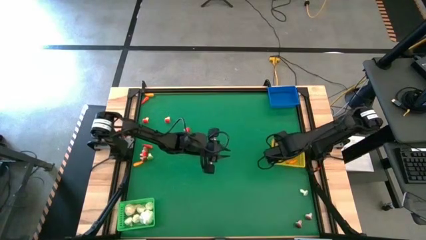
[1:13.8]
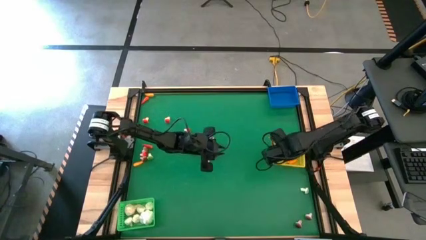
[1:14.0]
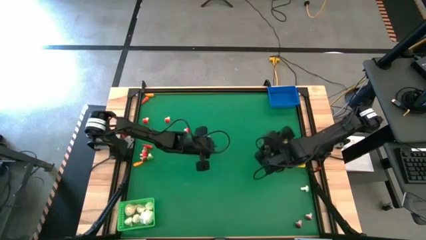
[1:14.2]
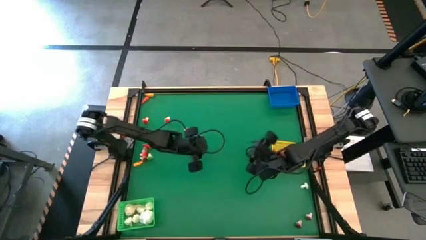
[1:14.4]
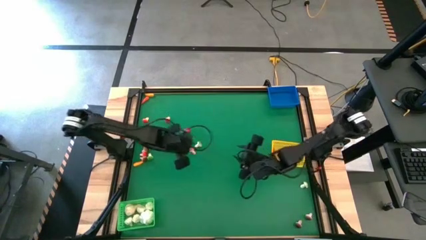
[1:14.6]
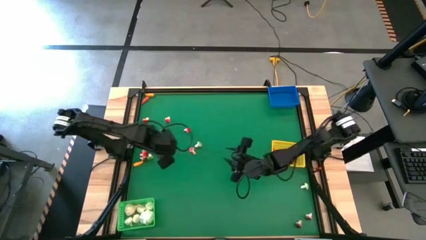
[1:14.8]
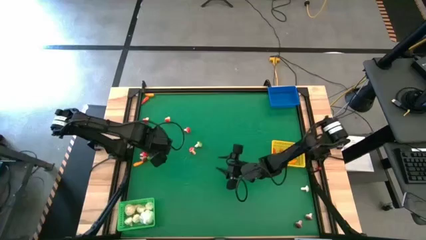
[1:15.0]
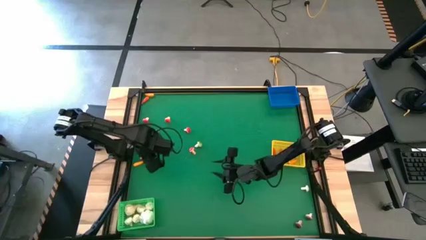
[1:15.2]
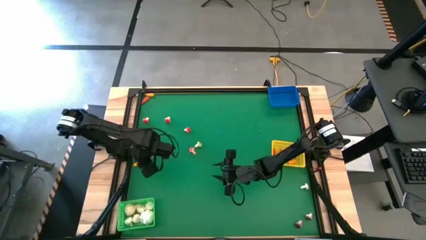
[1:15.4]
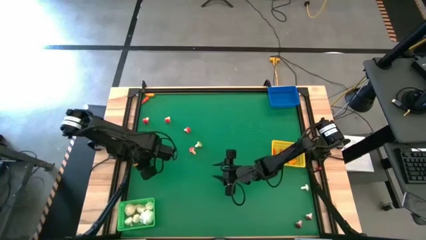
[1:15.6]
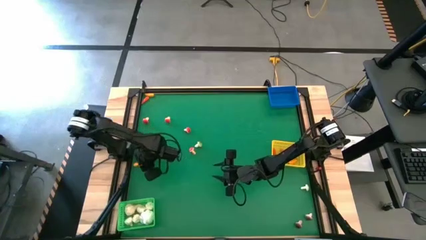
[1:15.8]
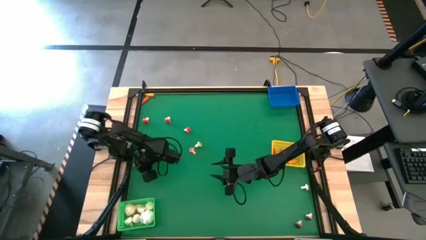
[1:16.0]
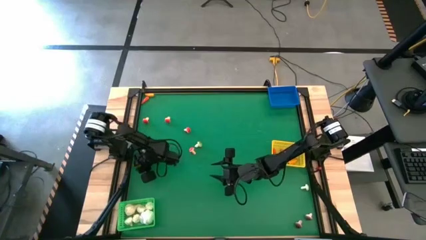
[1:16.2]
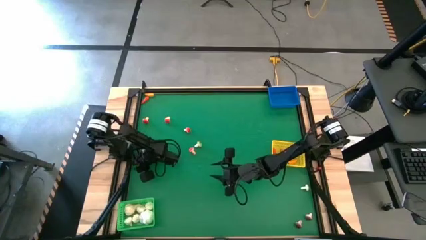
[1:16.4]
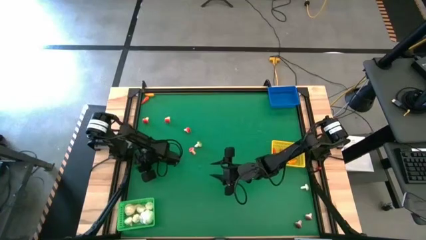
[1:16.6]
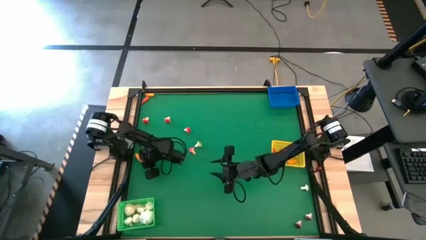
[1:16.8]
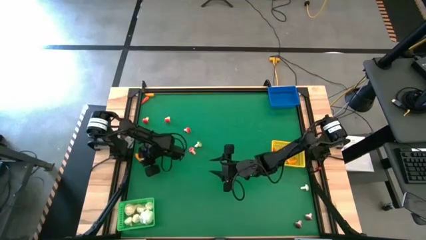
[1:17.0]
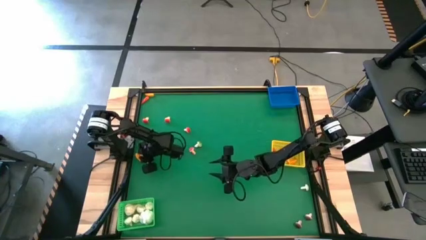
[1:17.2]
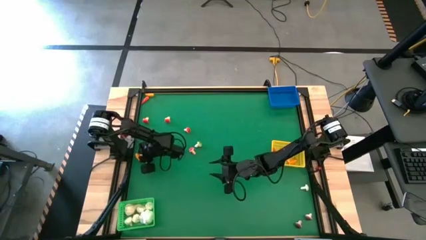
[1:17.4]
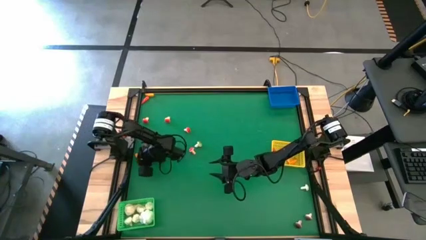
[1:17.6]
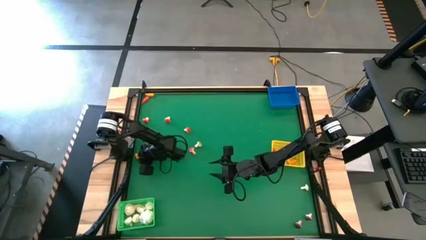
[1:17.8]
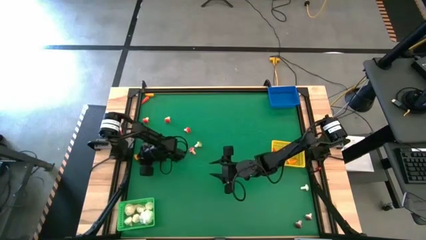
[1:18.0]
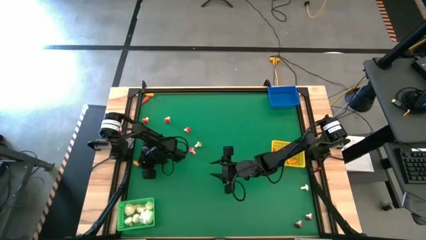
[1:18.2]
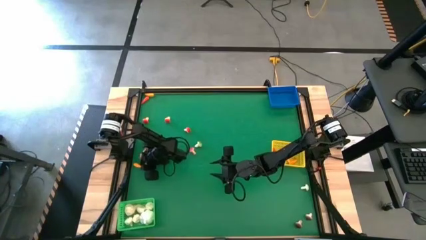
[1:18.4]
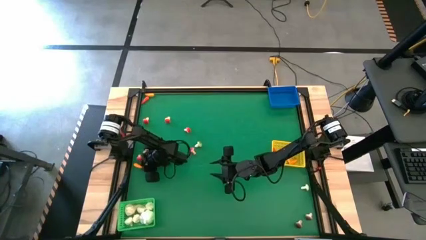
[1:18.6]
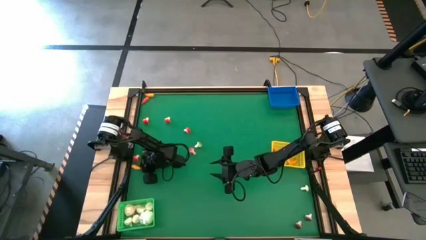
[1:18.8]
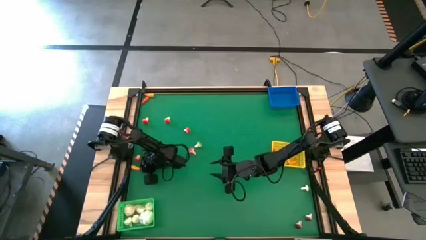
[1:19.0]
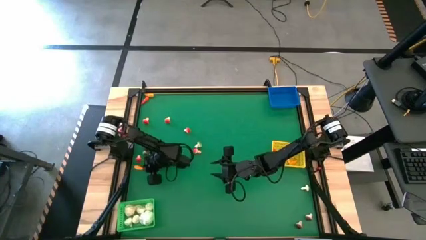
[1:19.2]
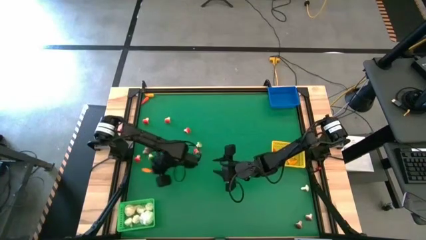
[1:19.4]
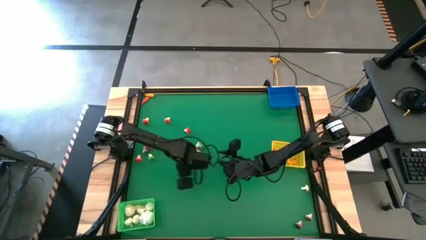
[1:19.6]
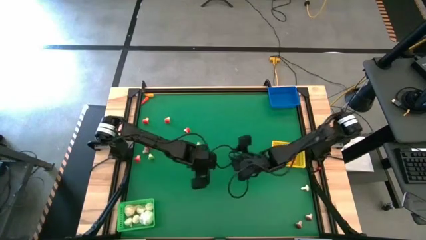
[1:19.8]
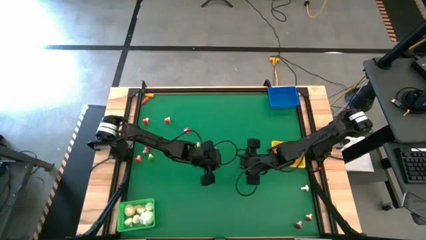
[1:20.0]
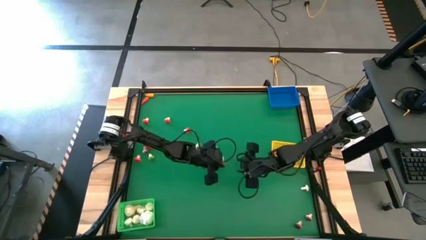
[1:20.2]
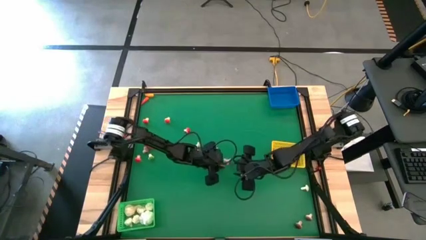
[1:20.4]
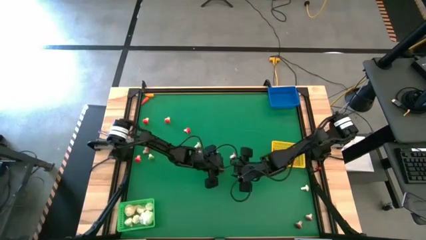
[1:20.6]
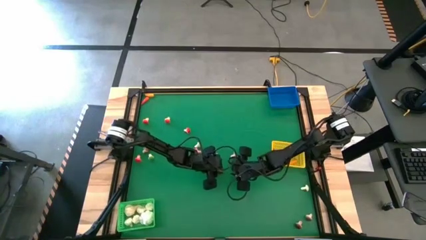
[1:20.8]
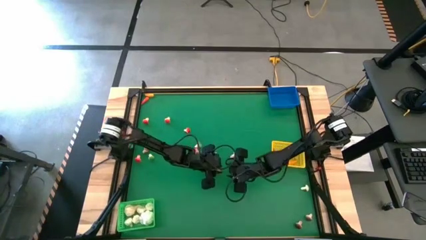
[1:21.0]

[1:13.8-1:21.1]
Task: Sort produce into baskets
Put the brown mushroom into the blue bin

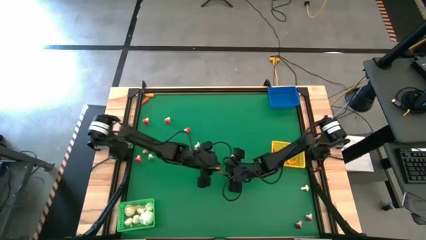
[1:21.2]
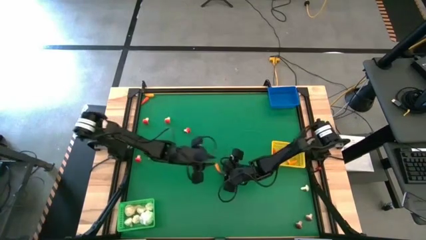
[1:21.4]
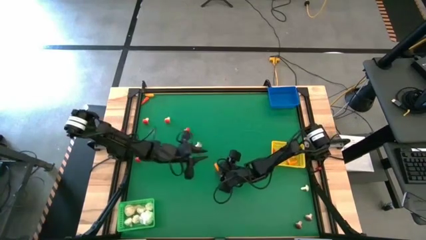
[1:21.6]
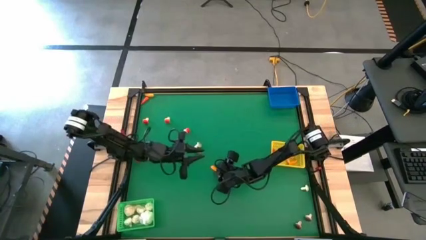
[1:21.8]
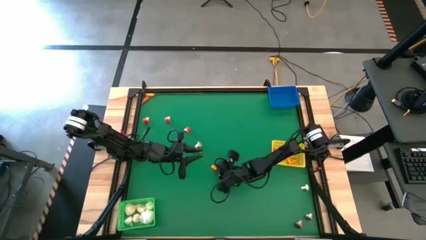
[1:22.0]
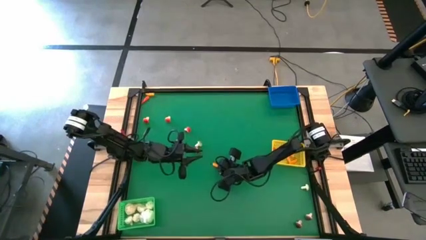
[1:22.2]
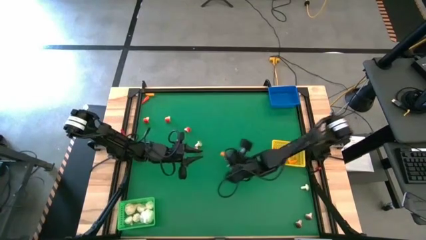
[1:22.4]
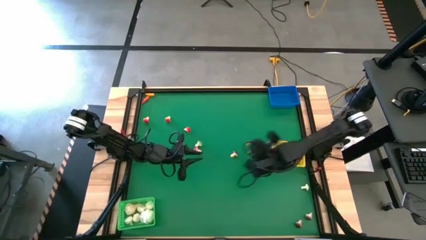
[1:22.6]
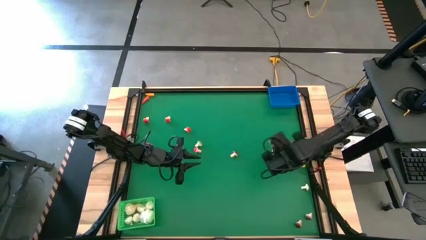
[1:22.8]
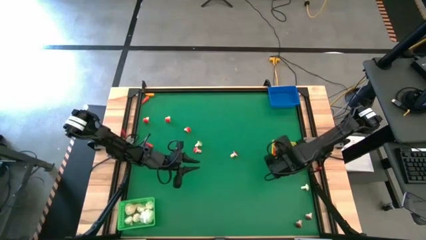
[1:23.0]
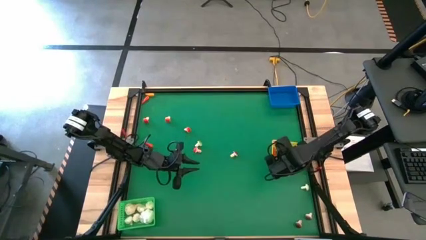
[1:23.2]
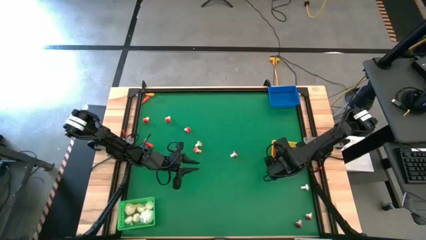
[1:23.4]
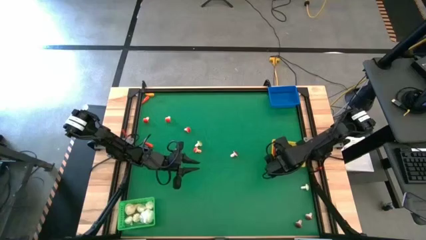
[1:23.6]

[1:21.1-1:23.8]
Put the yellow chili into the yellow bin

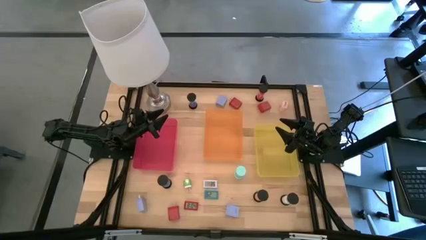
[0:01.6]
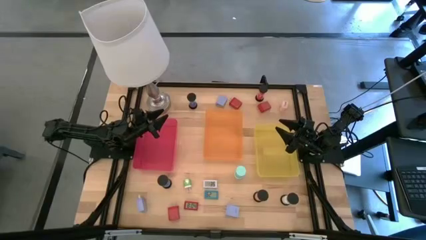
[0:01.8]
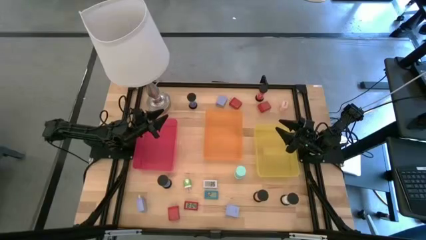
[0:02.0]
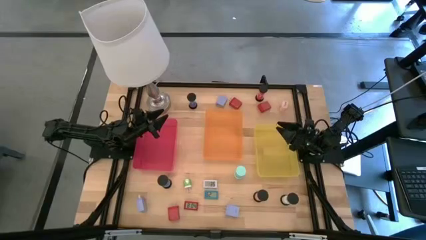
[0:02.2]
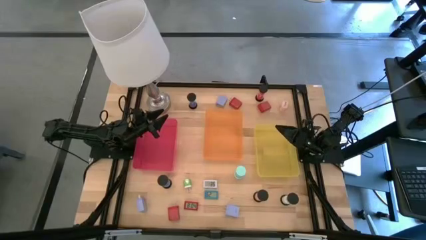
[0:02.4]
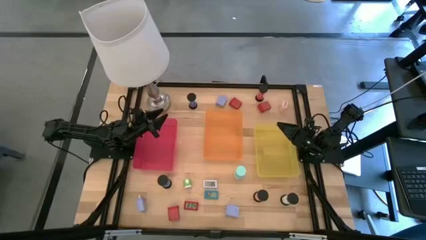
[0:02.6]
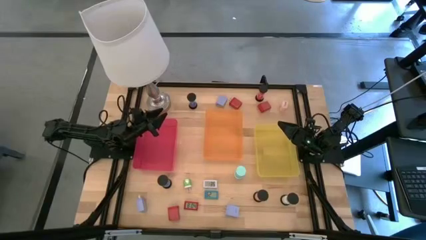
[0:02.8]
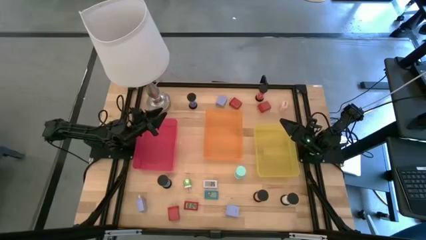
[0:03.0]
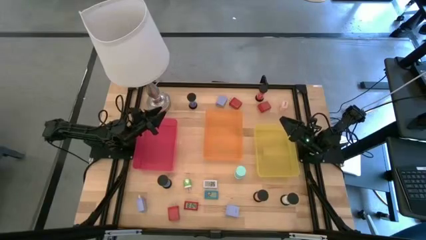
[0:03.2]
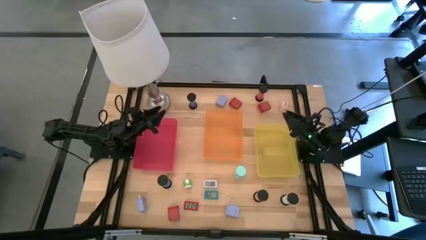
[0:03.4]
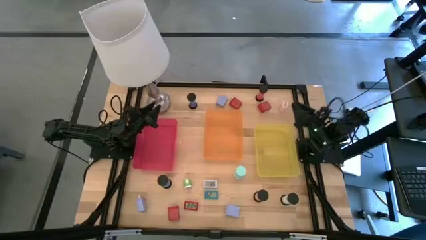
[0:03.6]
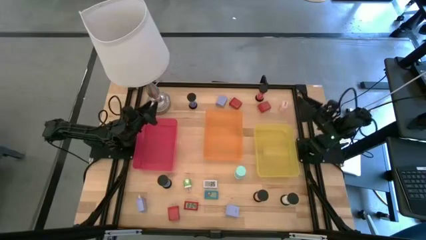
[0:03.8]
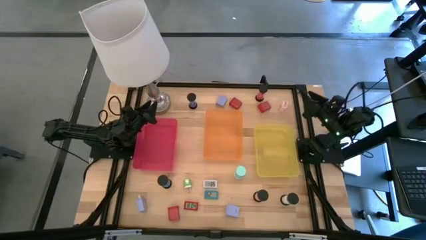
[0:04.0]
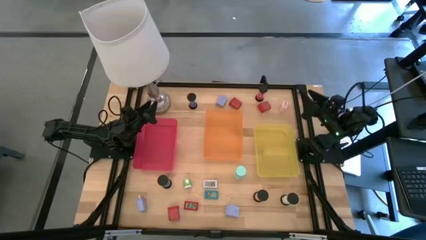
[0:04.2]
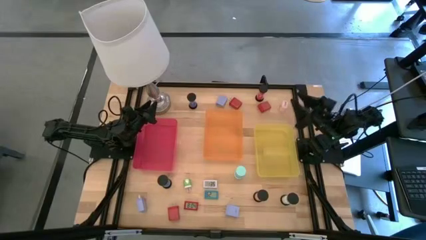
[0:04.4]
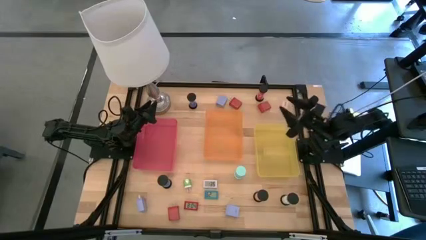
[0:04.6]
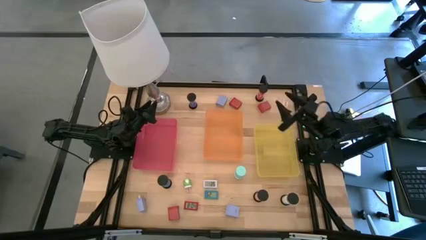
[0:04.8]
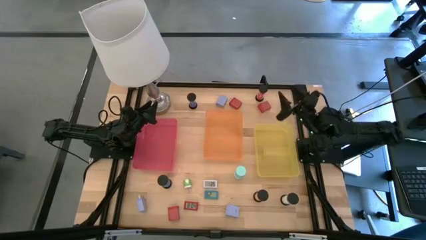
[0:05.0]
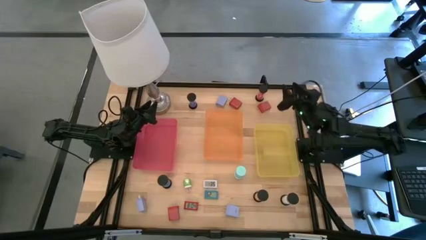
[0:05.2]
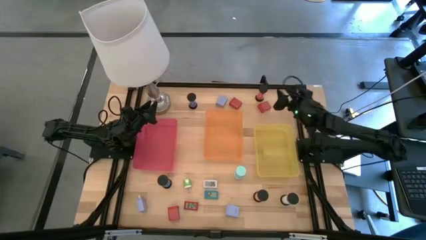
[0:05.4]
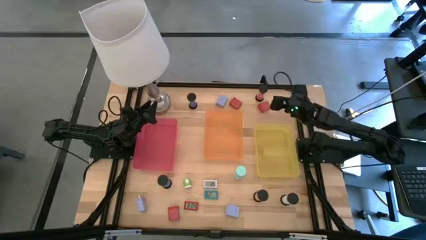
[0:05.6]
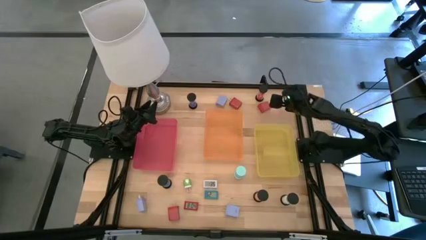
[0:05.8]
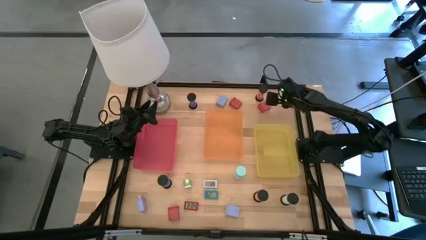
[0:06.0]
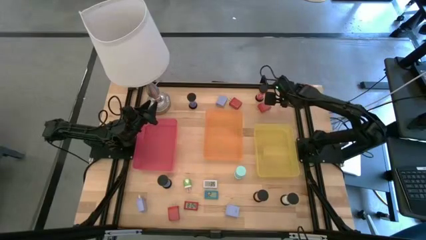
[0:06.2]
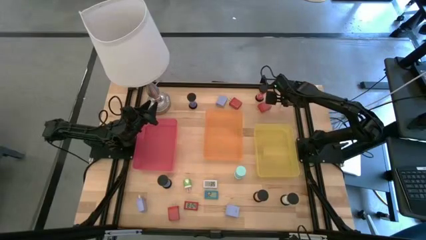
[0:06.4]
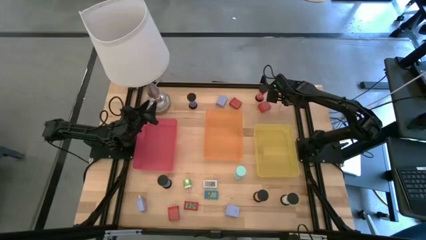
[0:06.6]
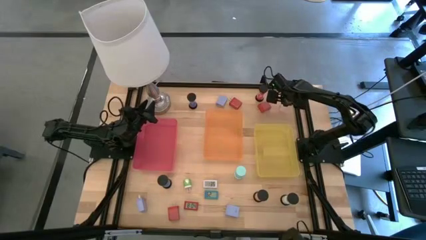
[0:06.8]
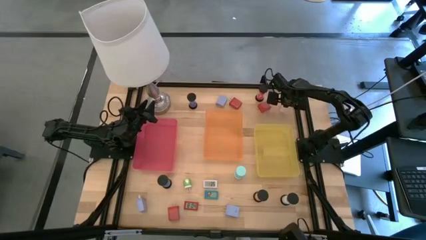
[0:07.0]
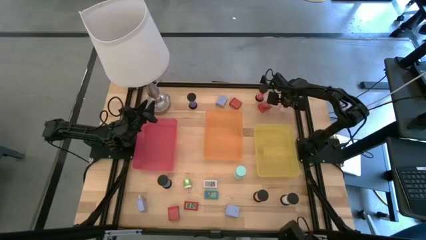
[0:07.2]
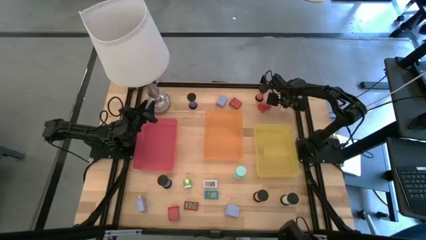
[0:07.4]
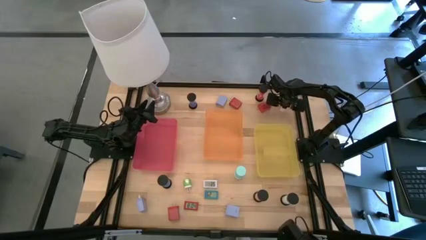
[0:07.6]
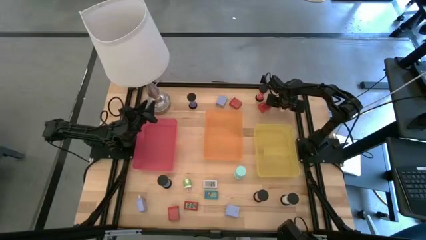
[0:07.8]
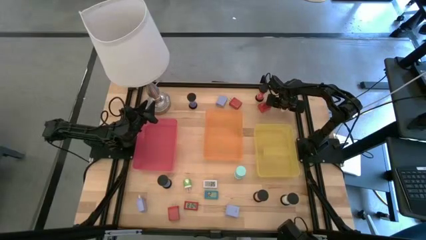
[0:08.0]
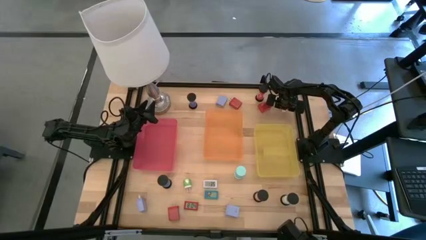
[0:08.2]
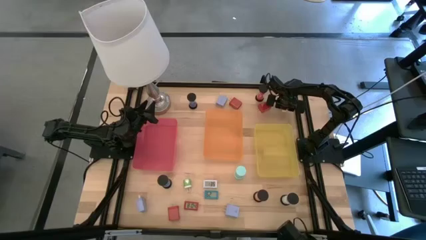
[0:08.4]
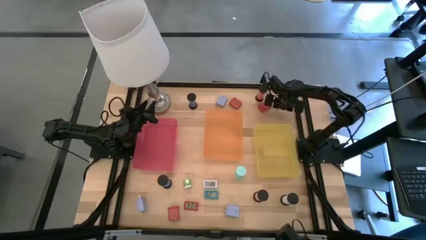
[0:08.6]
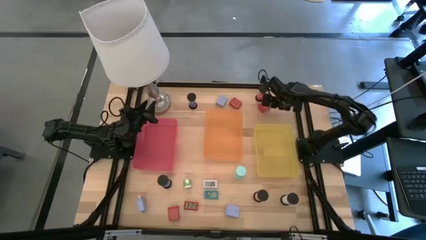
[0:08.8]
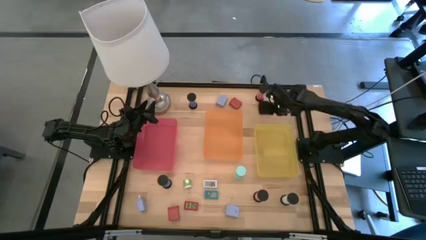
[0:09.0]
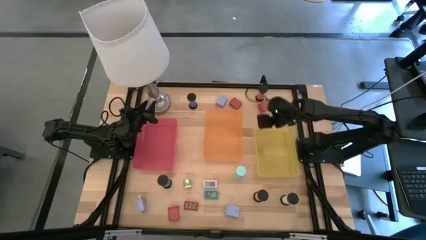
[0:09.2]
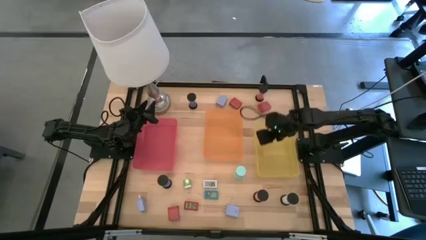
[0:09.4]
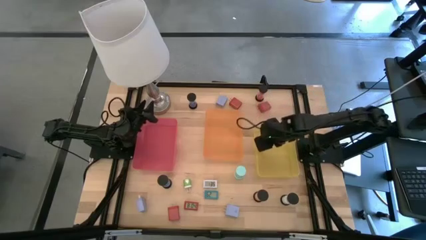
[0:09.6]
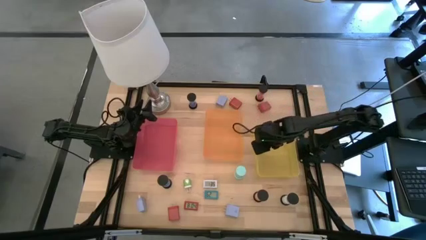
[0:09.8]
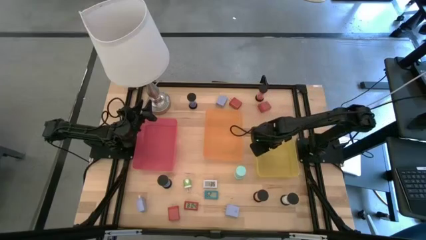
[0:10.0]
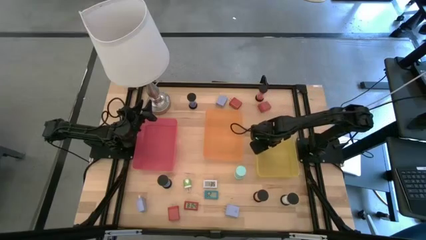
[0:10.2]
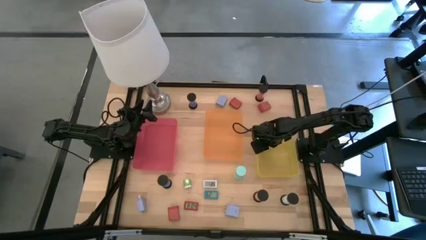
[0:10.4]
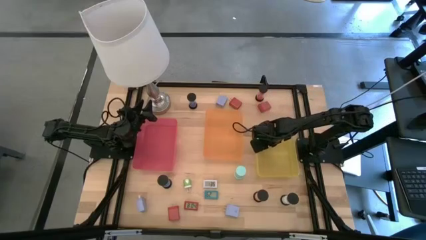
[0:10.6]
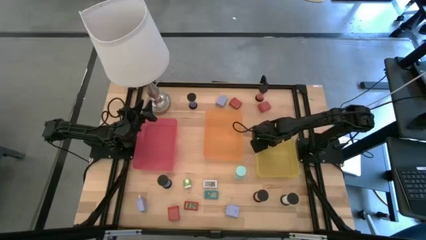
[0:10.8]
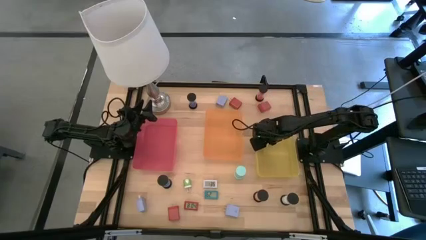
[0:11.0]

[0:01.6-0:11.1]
Task: Pick & Place Office items
Put the pink charger adapter into the yellow bin
